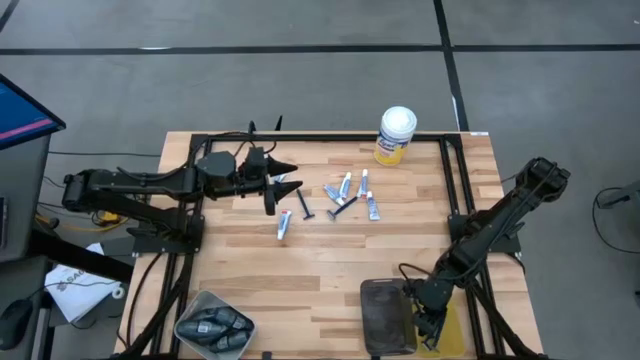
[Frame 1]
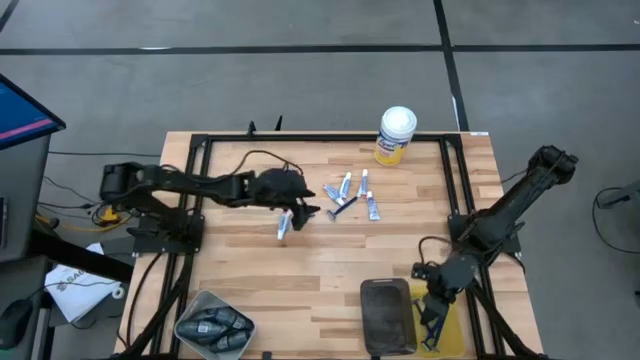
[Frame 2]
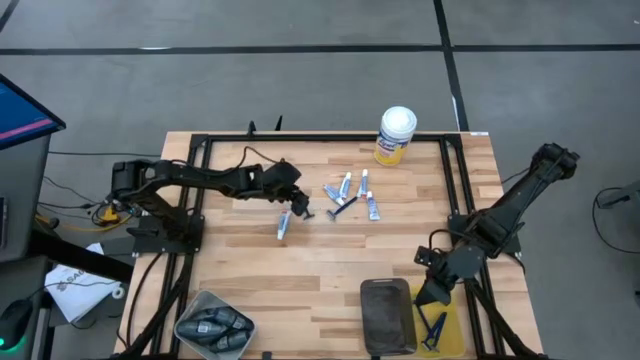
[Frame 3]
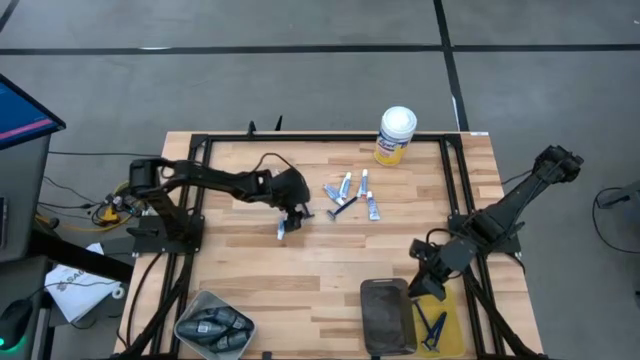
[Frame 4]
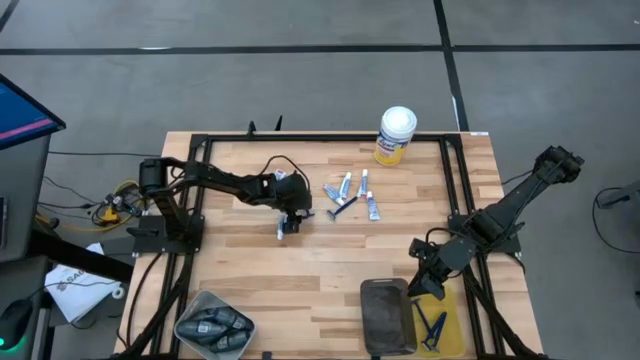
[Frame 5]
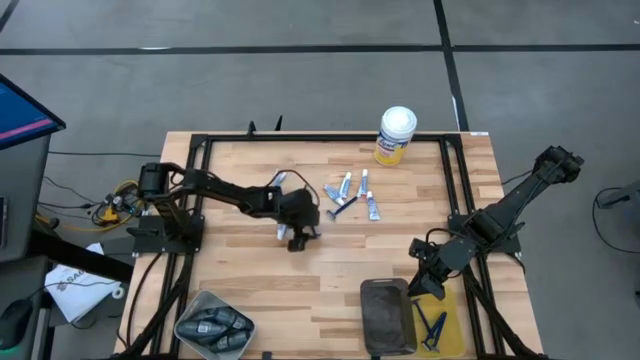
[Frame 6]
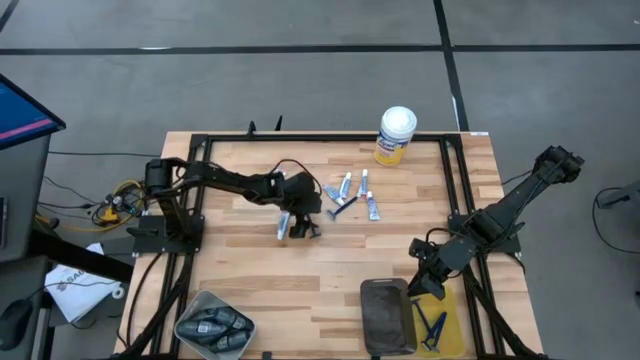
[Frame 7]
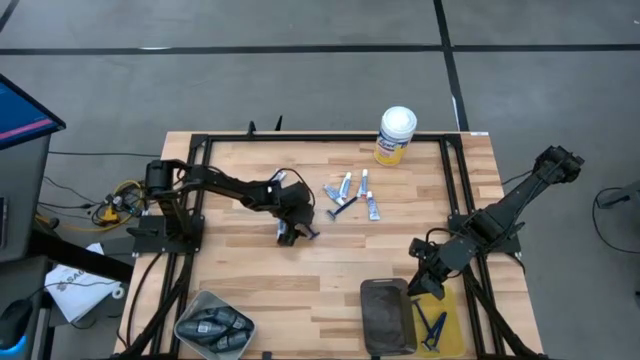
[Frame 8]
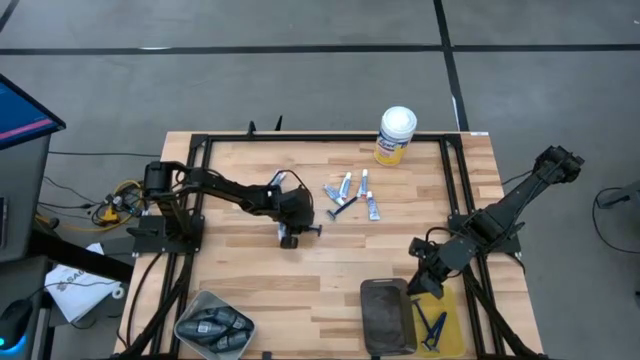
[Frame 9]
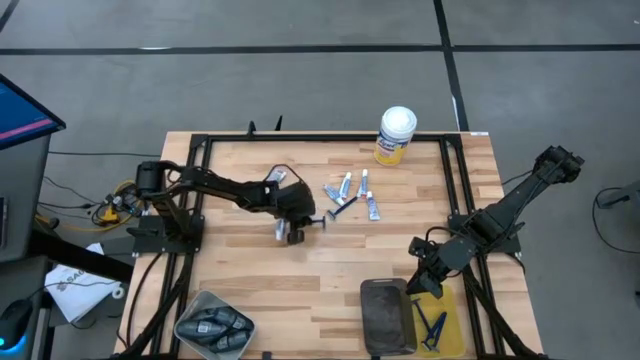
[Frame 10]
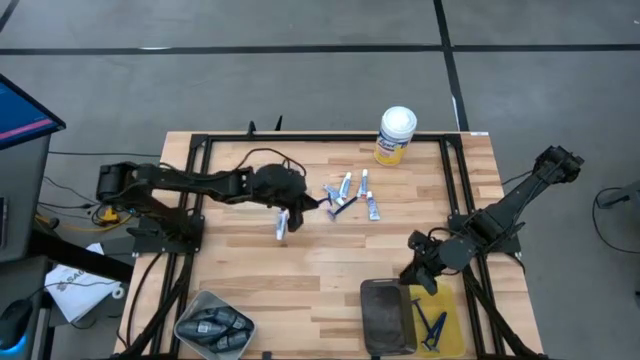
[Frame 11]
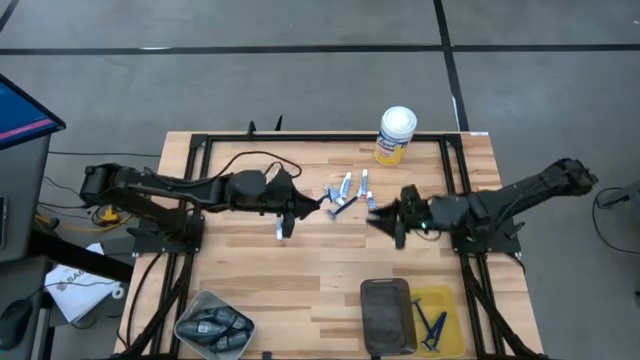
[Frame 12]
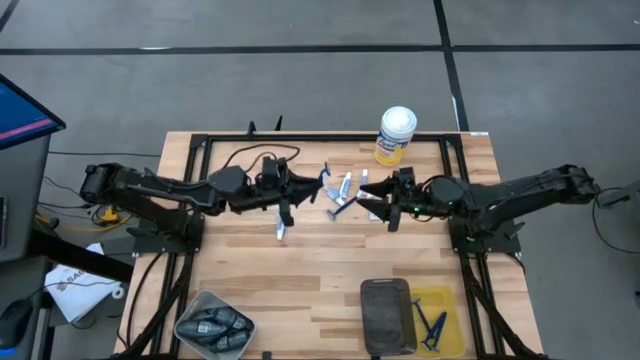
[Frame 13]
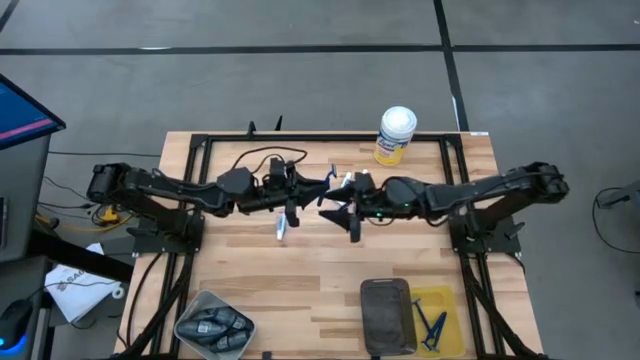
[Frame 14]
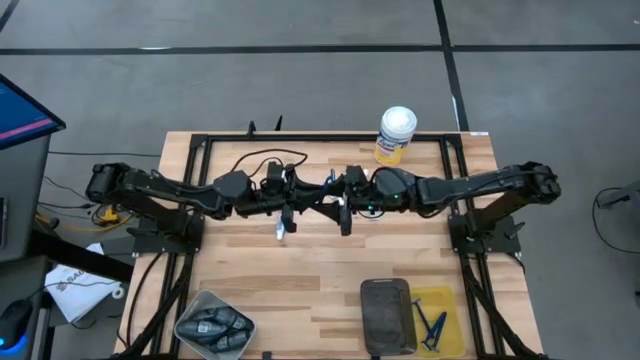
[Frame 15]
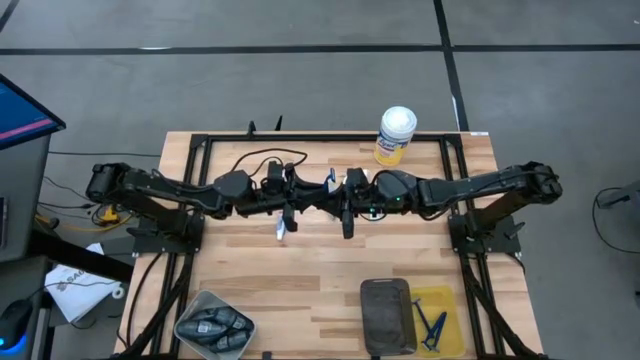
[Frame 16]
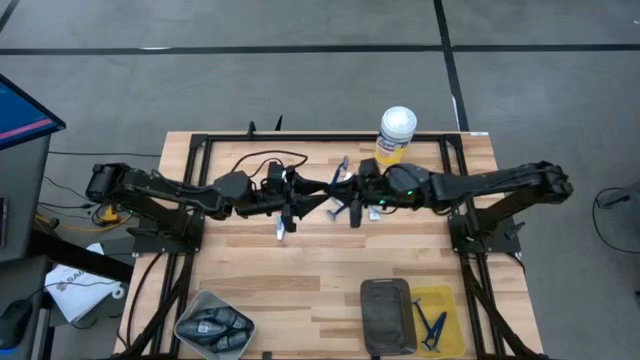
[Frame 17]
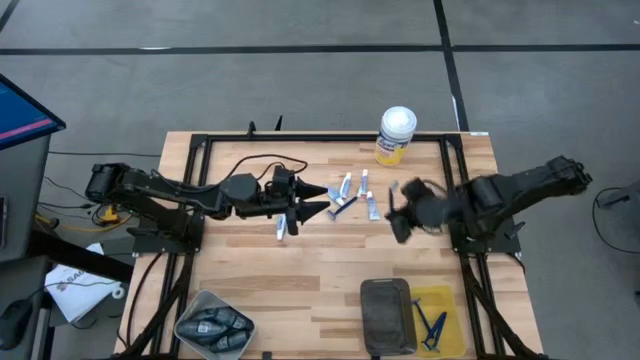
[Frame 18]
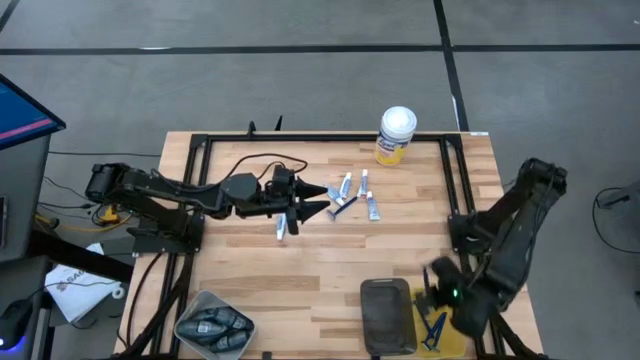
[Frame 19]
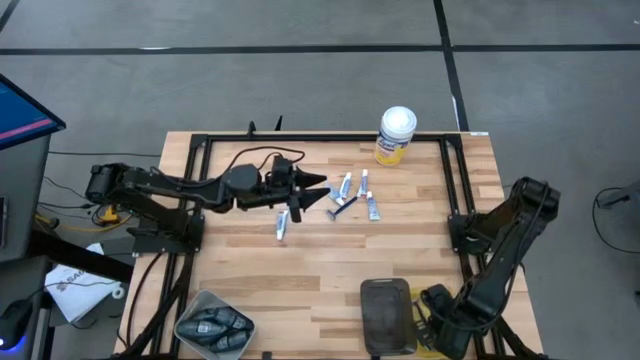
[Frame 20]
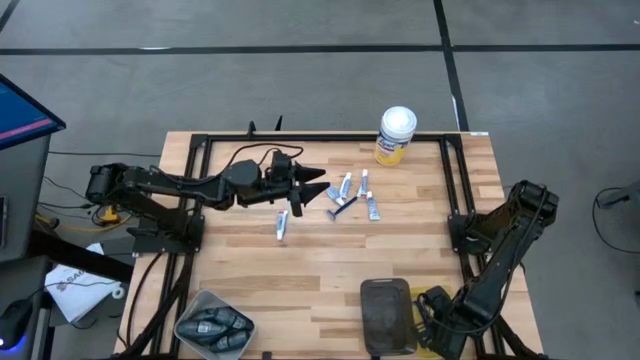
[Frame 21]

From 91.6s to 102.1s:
Task: Pick & Place Travel size toiletries
Put the razor into the yellow bin

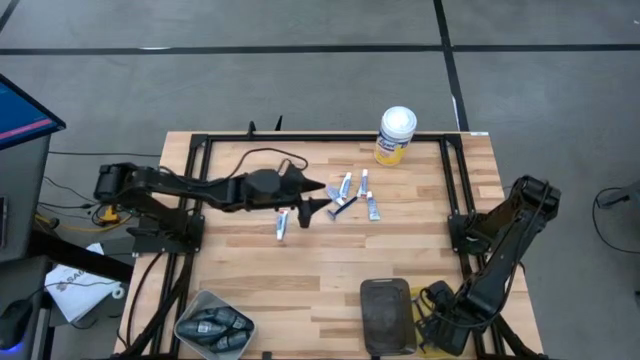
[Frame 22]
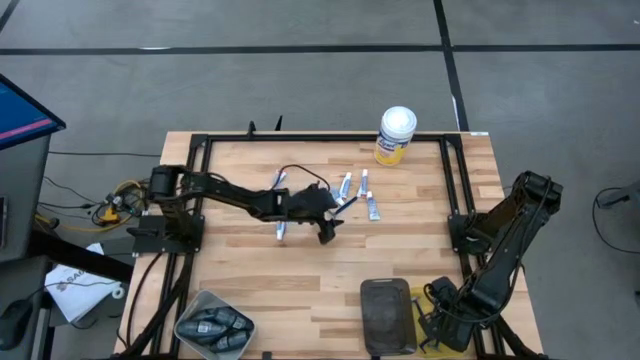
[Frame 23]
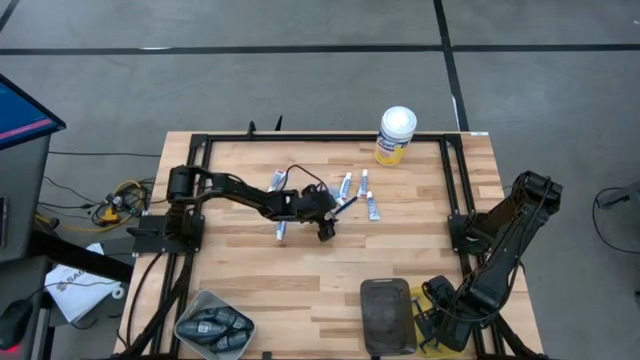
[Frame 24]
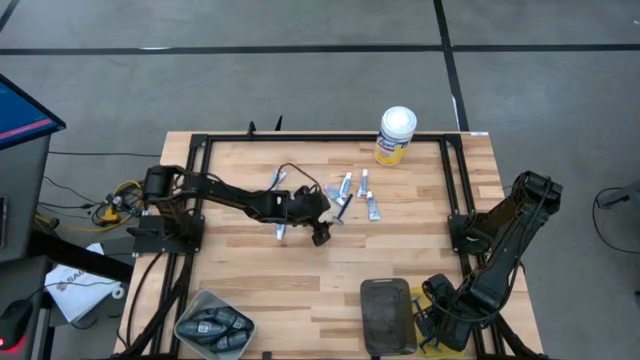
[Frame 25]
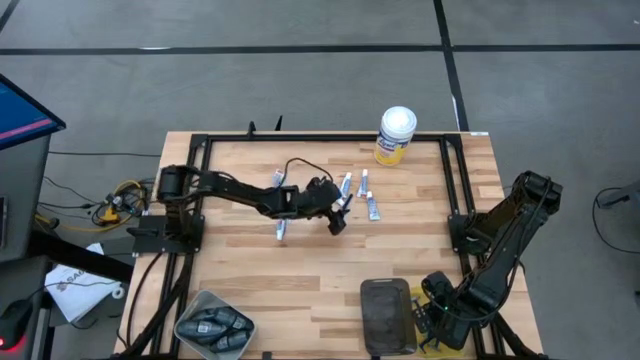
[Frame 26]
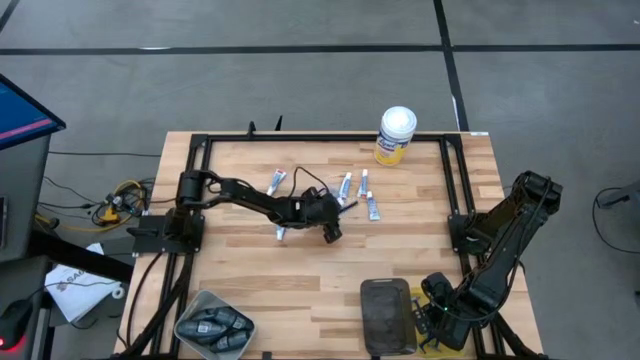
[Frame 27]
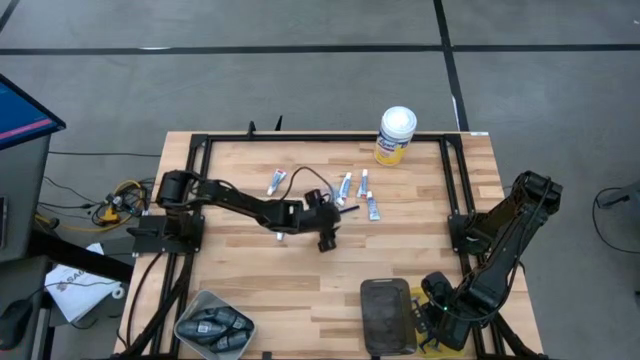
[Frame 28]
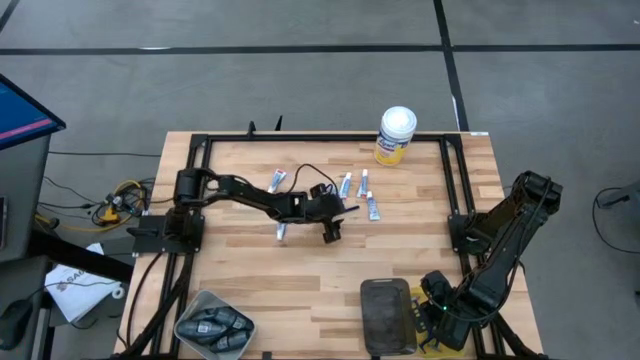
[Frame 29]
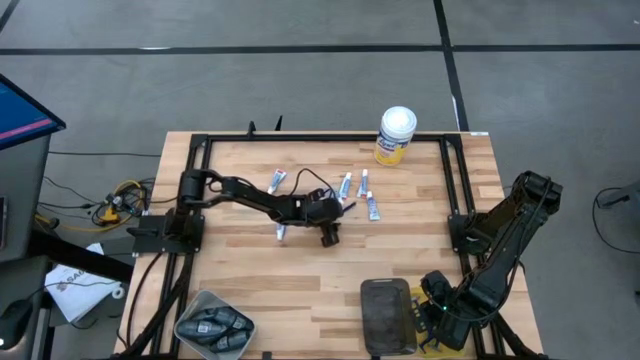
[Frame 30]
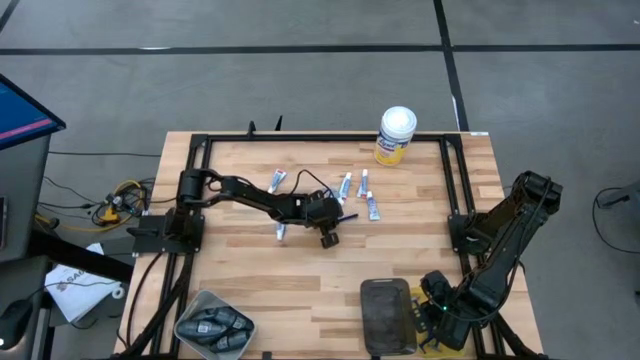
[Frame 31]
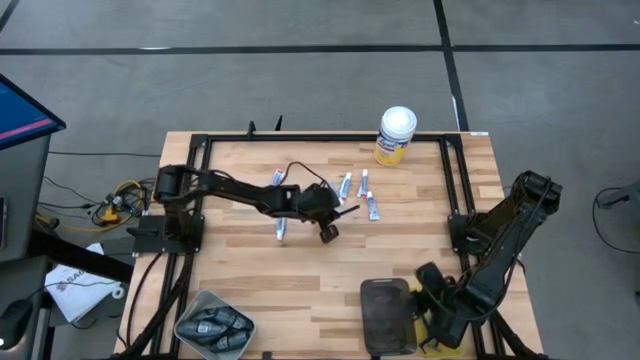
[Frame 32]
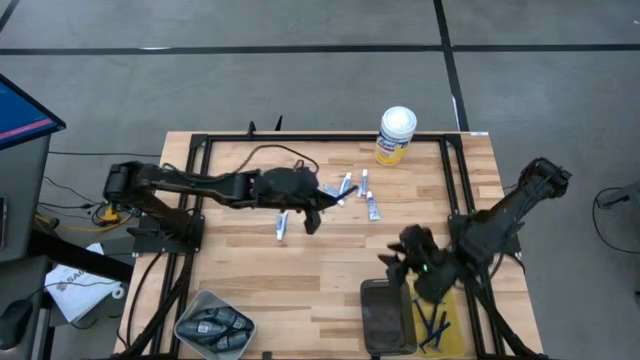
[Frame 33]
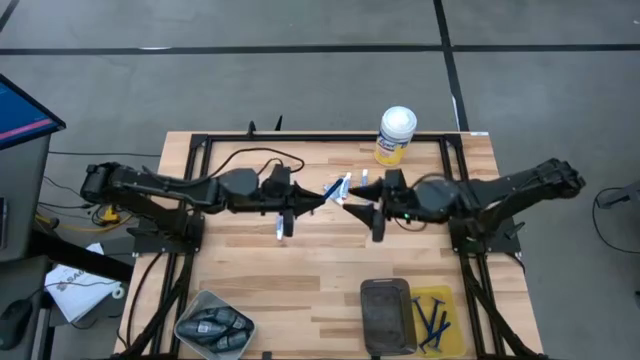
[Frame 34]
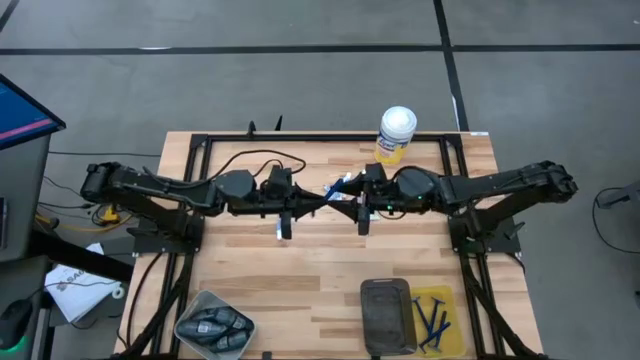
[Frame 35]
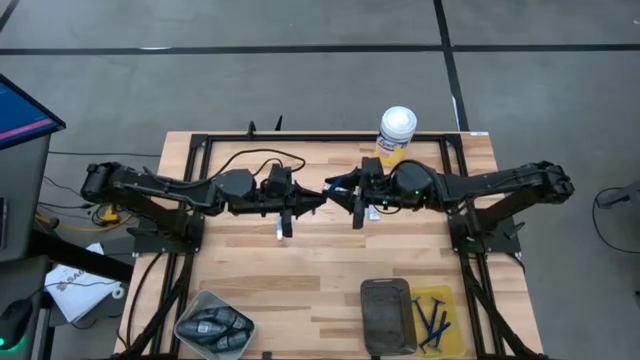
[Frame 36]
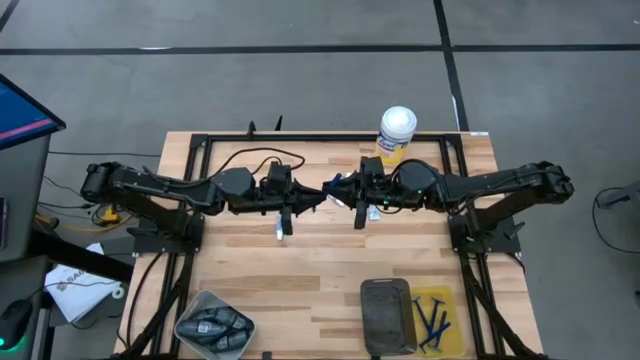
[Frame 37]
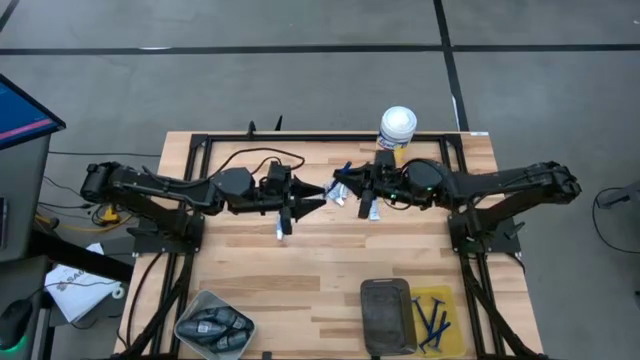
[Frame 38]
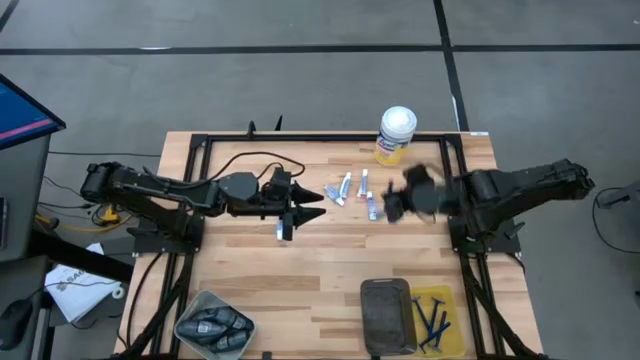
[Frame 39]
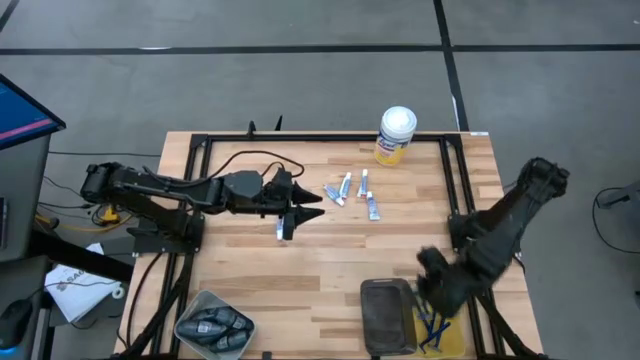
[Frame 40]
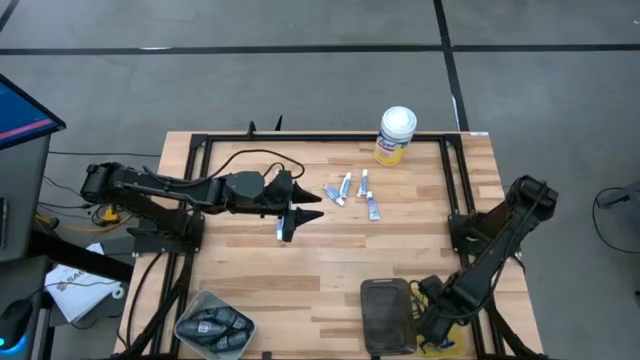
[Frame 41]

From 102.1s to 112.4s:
Put the razor into the yellow bin

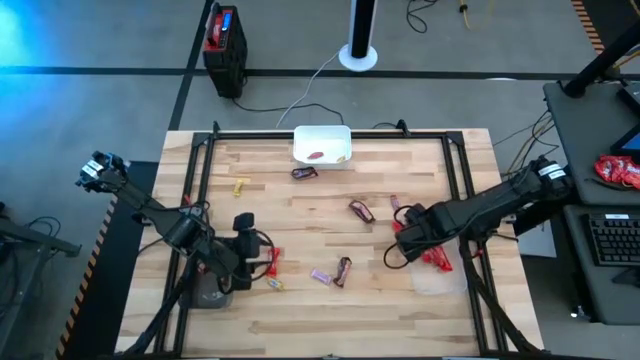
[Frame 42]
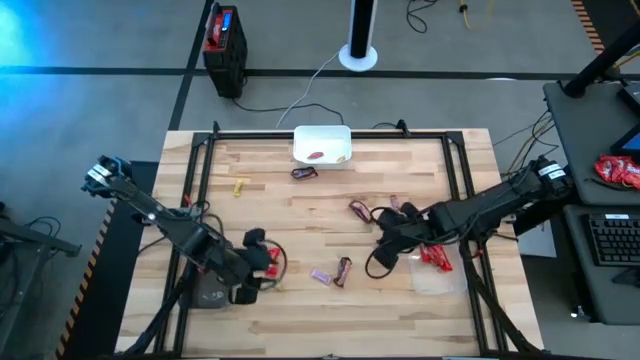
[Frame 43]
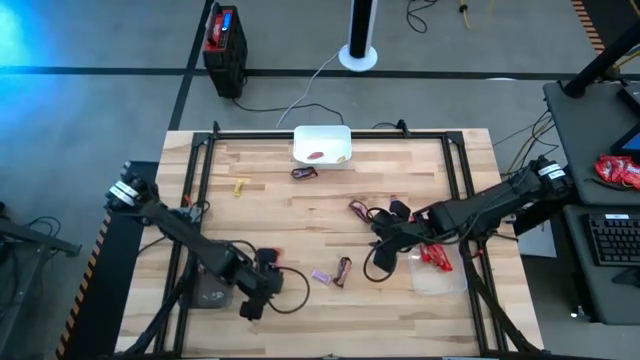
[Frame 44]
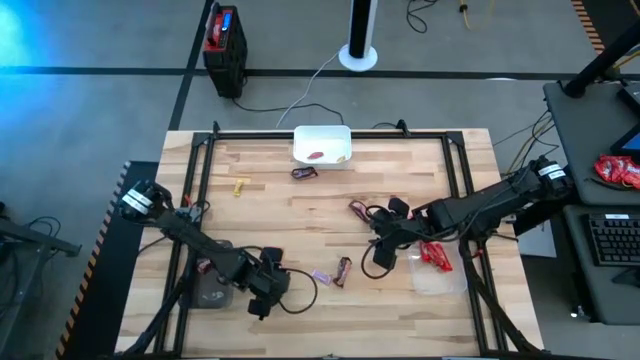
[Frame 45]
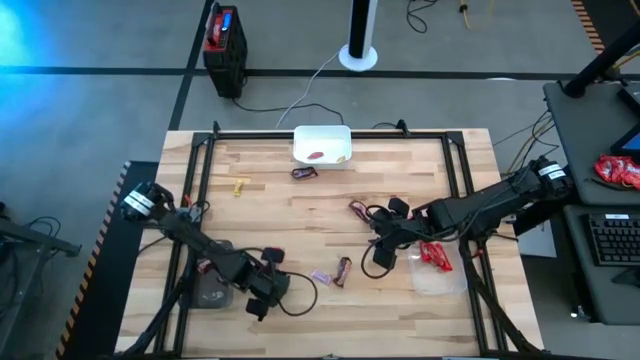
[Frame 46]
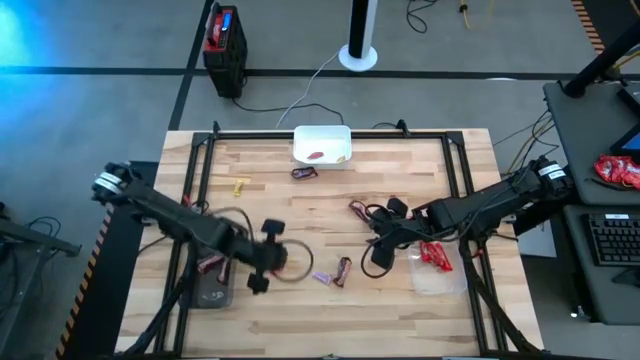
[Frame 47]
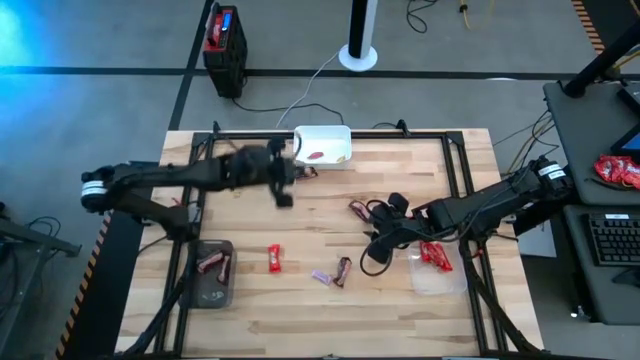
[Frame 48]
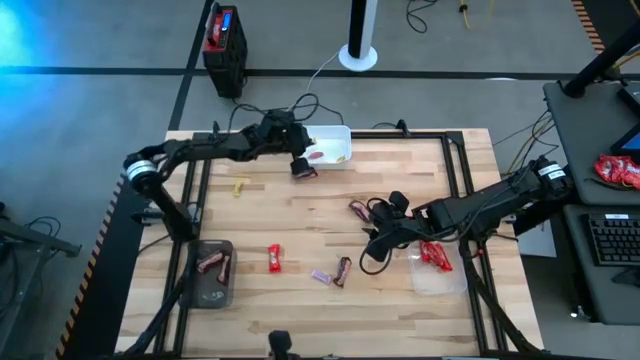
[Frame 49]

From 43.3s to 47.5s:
Task: Sort candy by brand, put in halloween buckets
Put the yellow candy into the white bin
